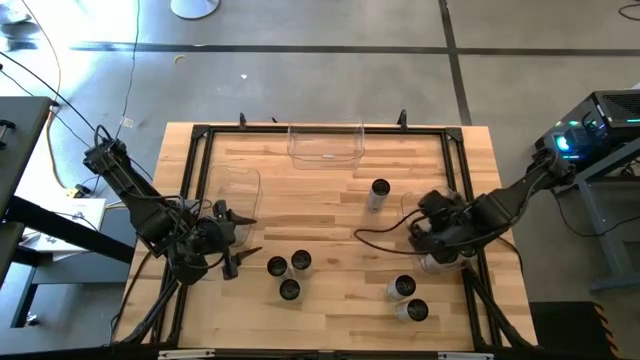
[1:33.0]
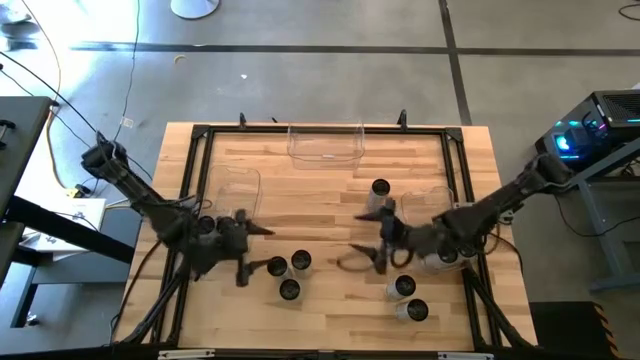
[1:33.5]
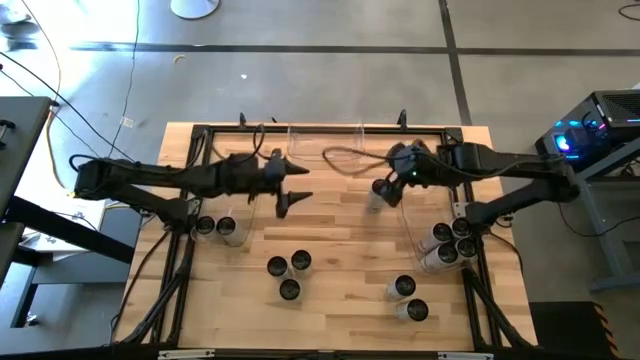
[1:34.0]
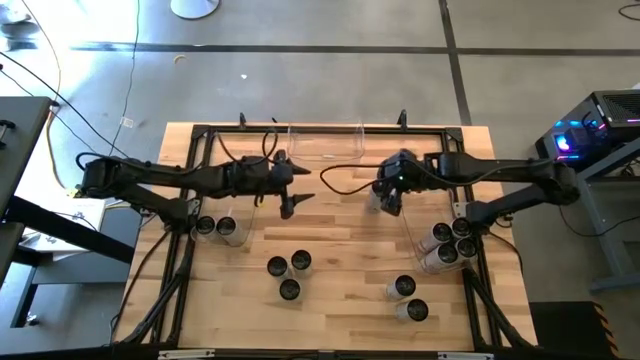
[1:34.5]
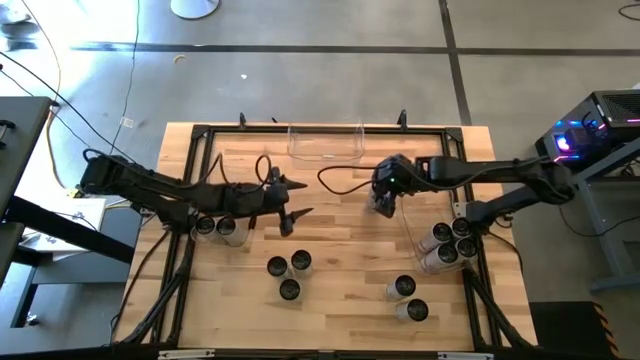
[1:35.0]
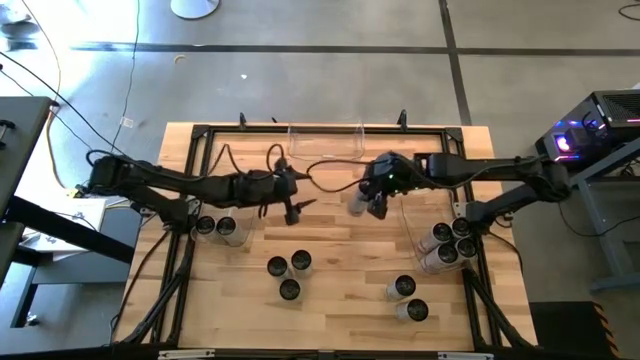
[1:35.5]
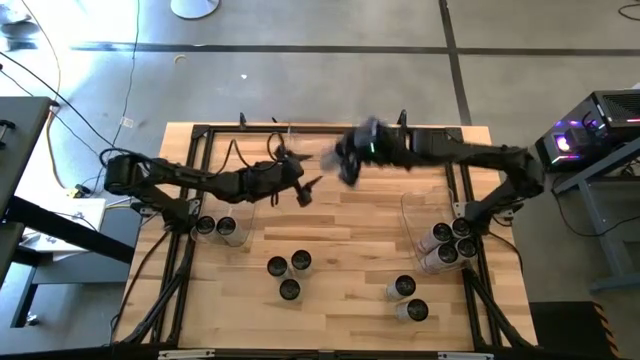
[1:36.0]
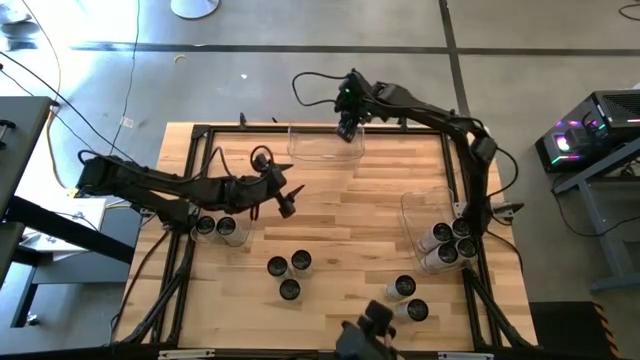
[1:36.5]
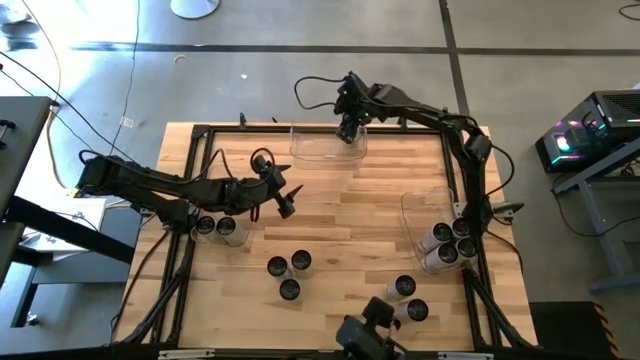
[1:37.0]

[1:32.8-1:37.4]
Task: Sort soda cans
Put the white-blue soda can into the middle transparent bin

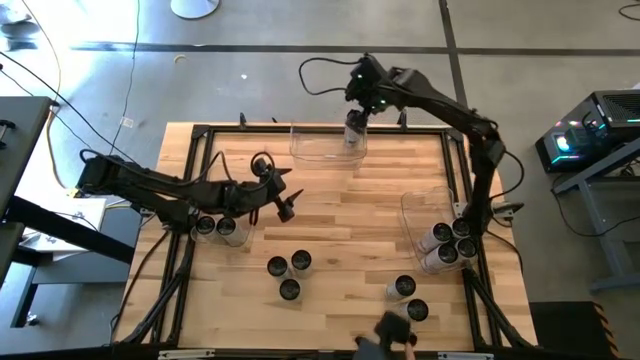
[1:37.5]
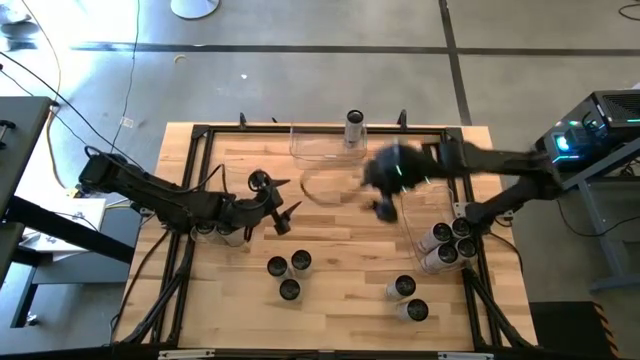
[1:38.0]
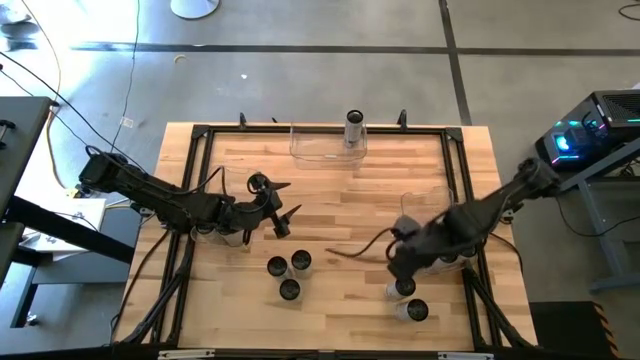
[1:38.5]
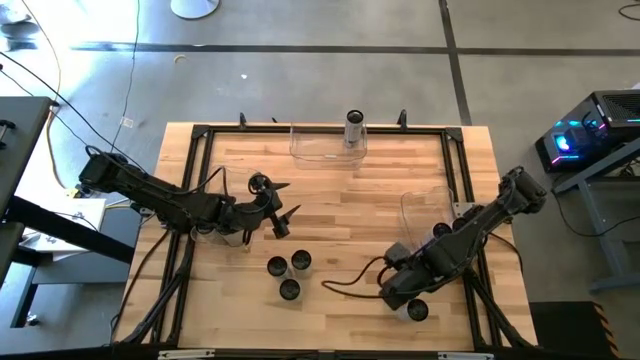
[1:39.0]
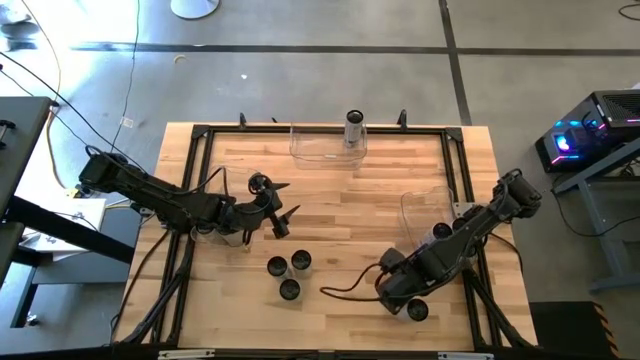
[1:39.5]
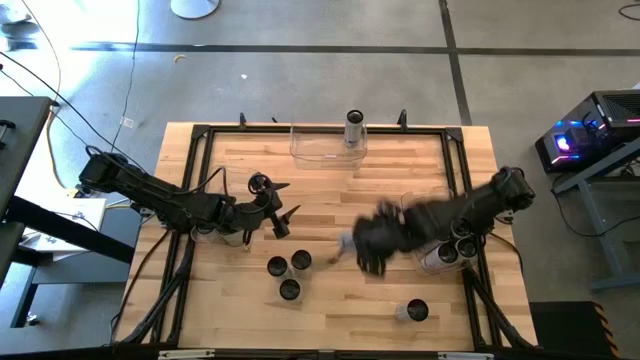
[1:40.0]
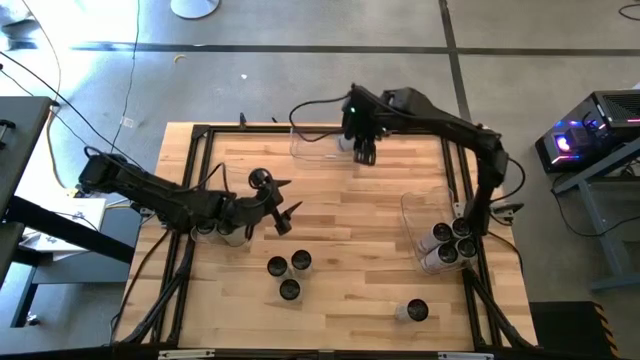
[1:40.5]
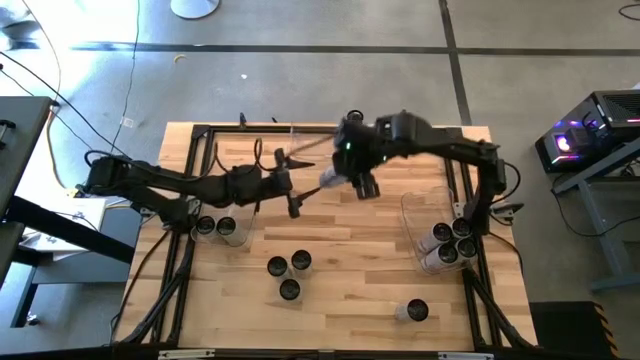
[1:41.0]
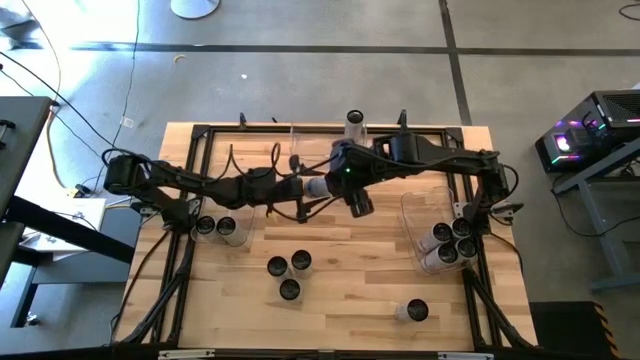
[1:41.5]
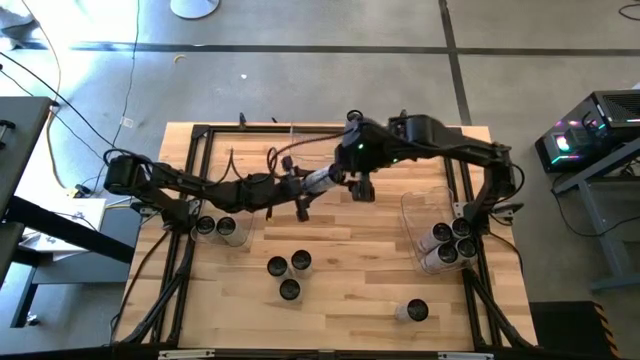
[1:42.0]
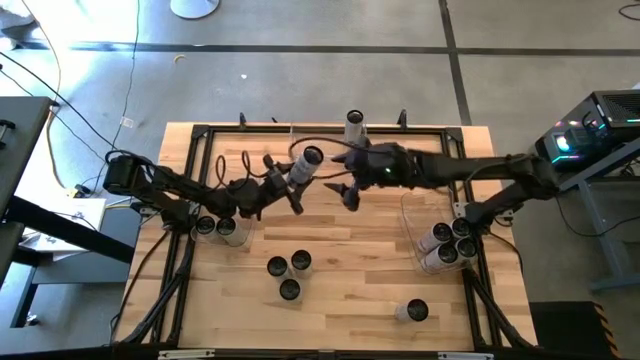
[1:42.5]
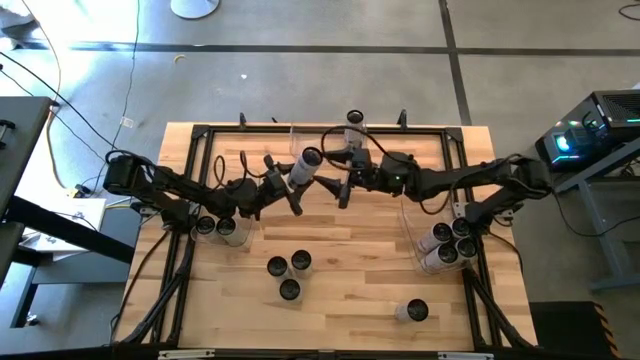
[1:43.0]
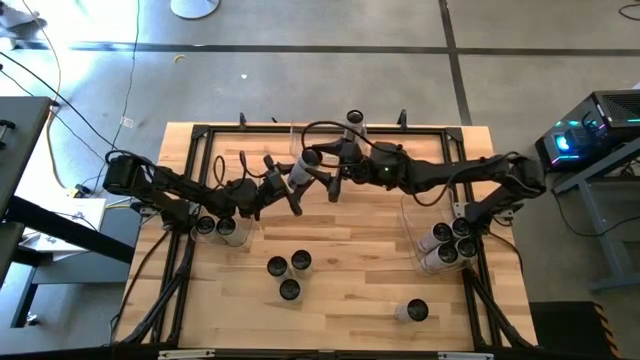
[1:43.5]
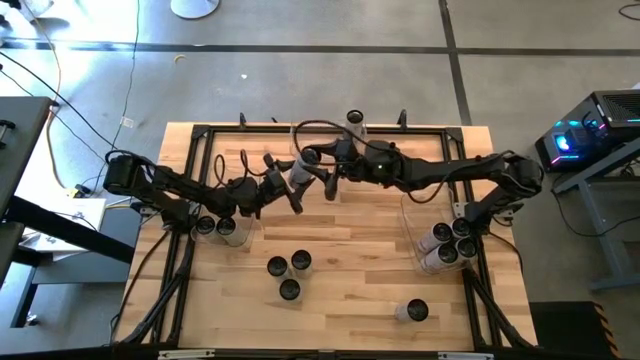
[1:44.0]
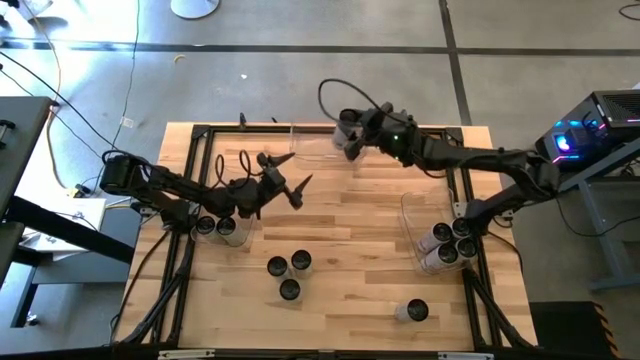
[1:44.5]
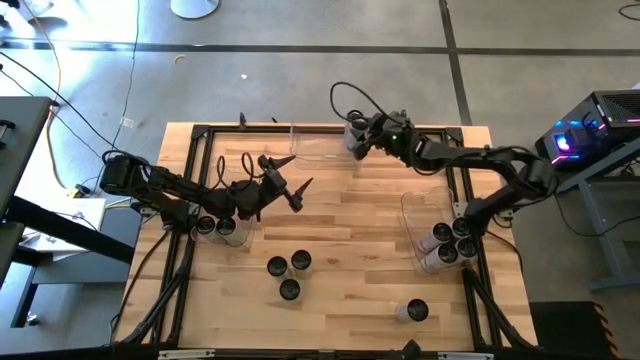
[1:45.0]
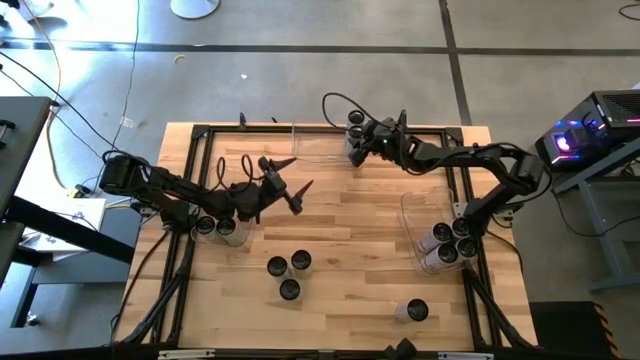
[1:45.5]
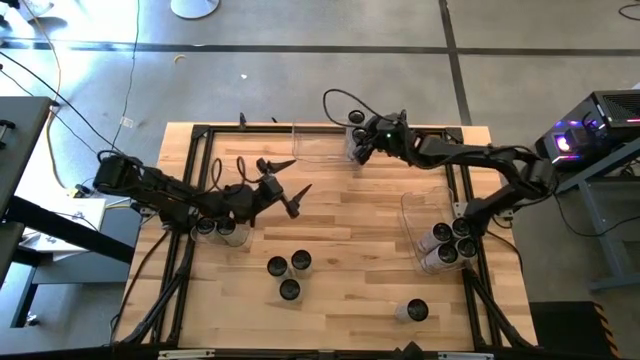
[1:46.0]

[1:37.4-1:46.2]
Put the white-blue soda can into the middle transparent bin

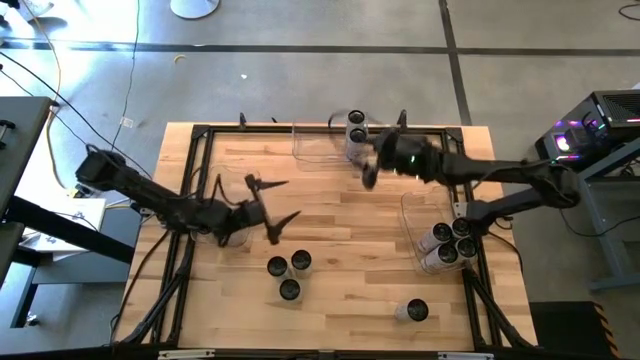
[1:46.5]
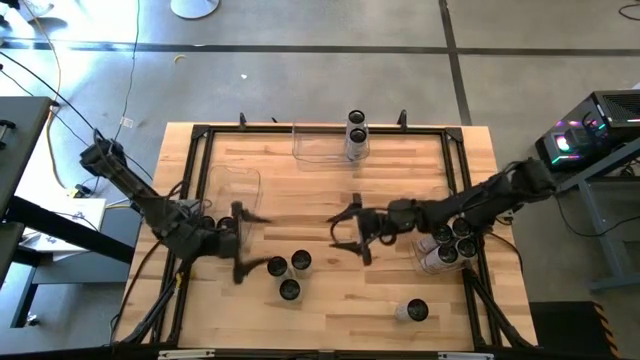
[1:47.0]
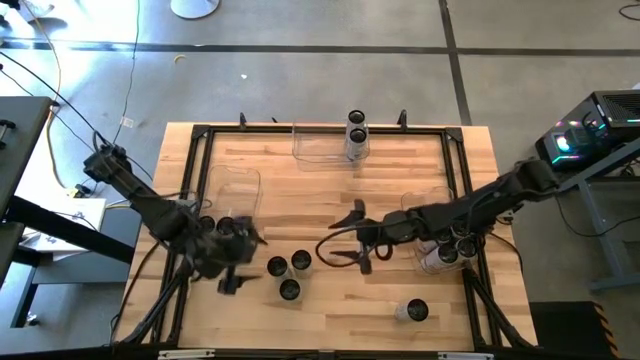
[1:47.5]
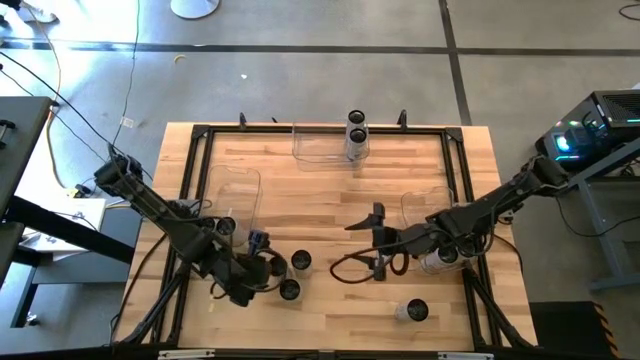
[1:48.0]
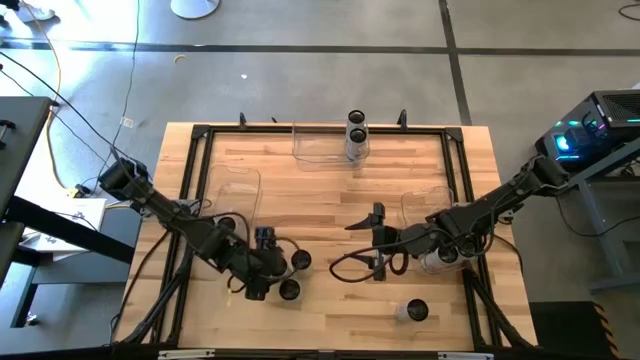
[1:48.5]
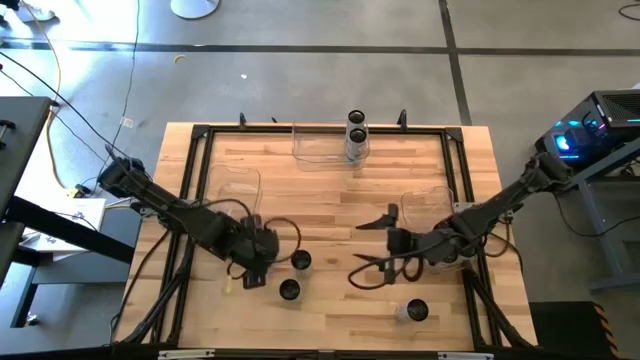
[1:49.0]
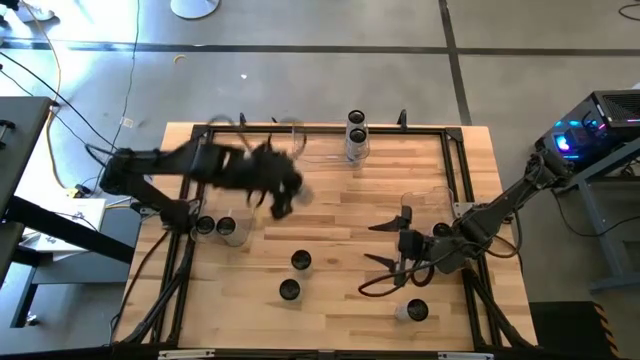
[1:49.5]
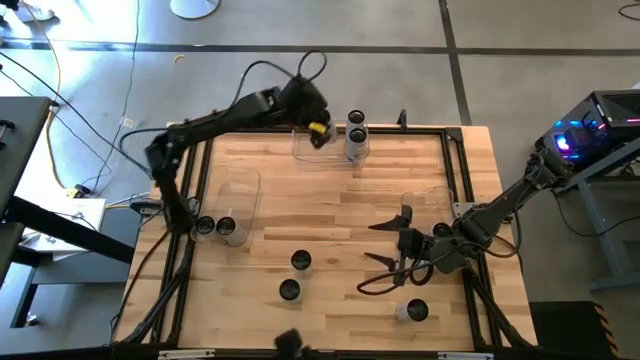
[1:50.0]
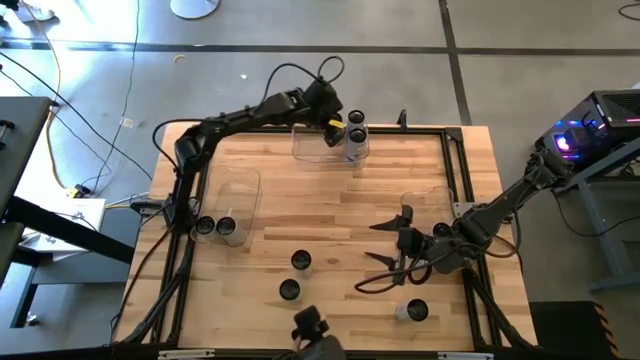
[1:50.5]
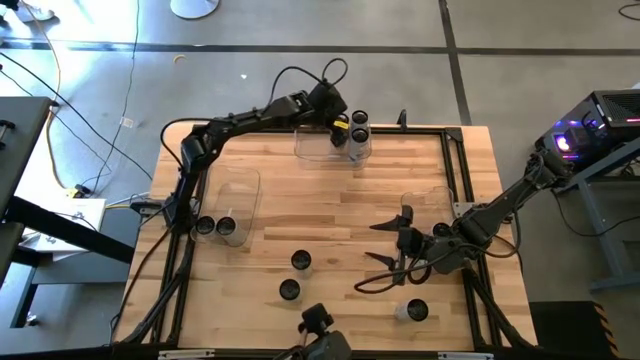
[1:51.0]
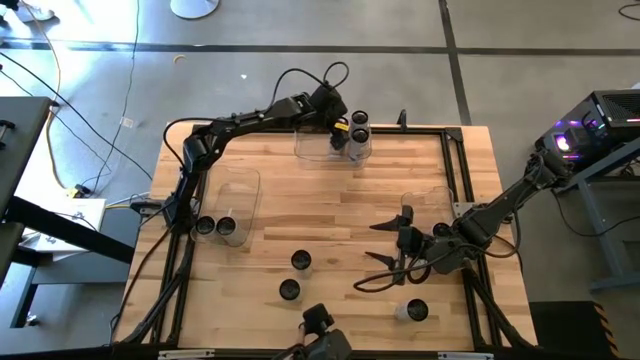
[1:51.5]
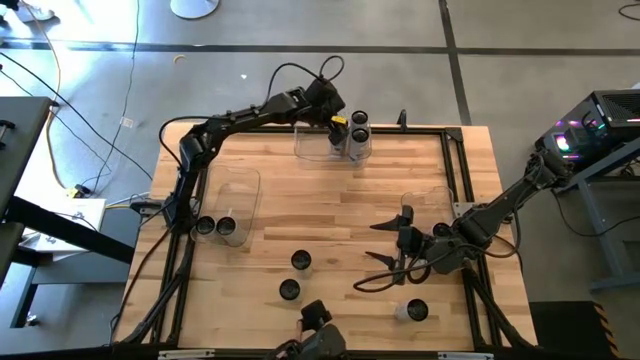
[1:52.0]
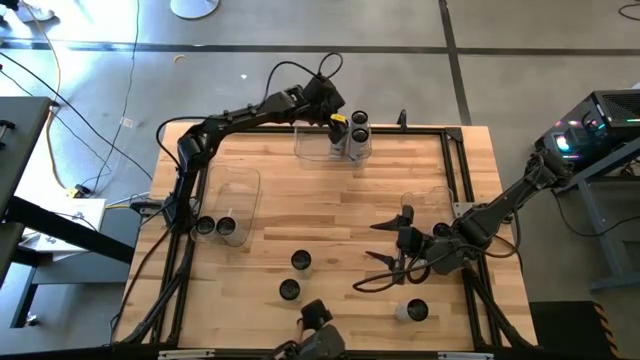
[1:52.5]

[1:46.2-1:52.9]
Put the white-blue soda can into the middle transparent bin

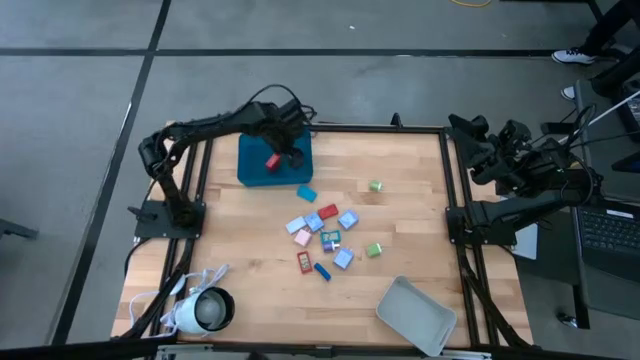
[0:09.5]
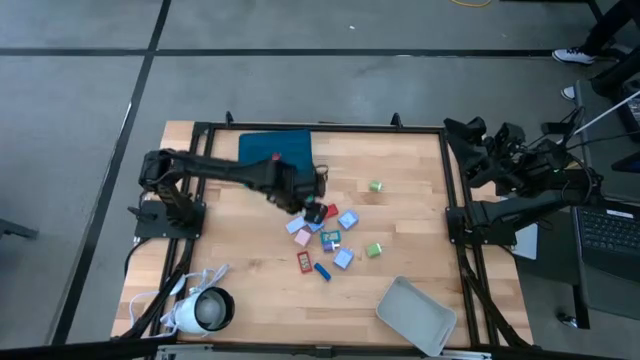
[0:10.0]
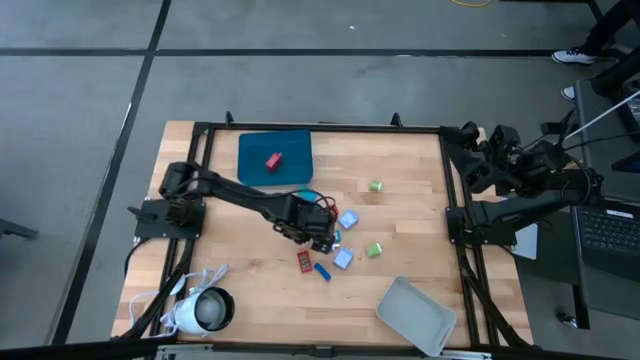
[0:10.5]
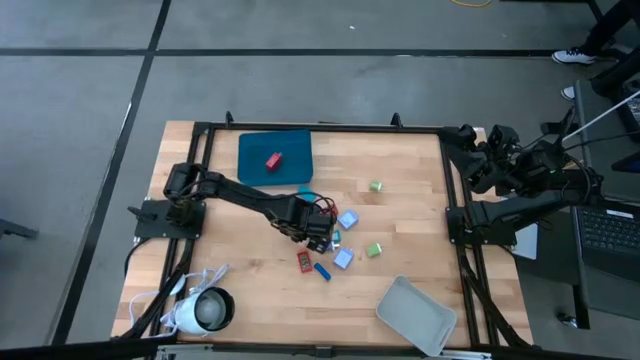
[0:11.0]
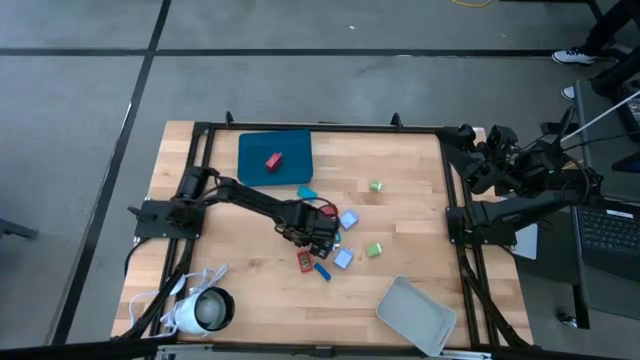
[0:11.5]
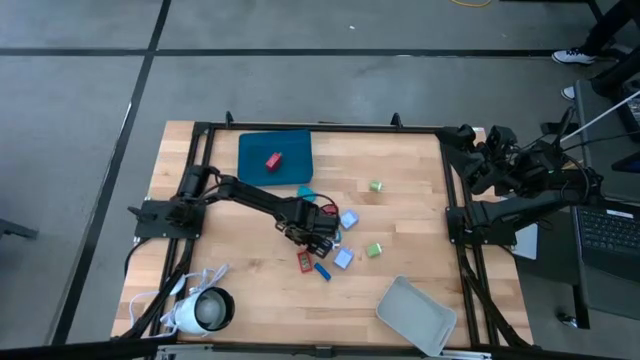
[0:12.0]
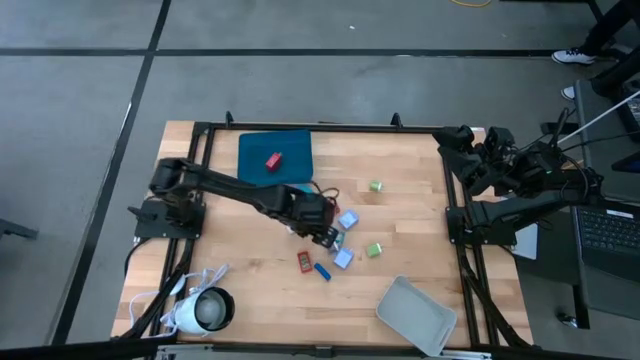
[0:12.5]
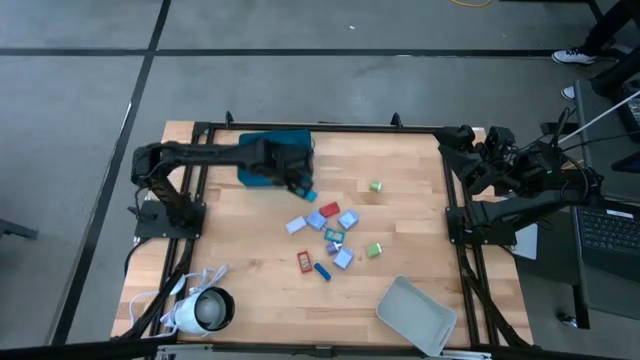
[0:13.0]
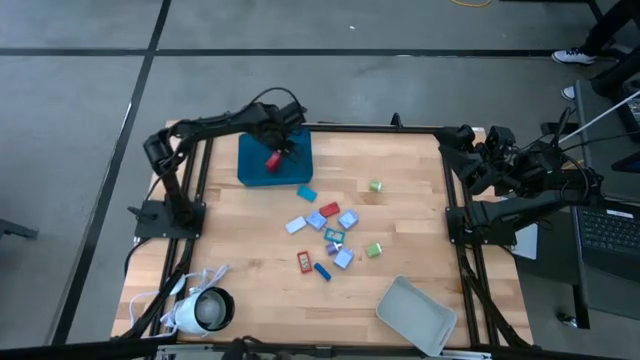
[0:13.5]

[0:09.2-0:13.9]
Task: Pick & Place Office items
Put the white charger adapter into the blue bin
